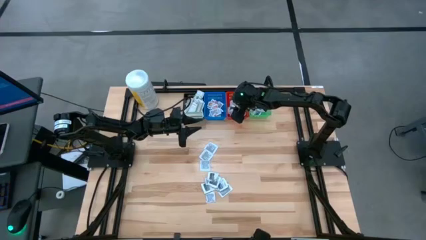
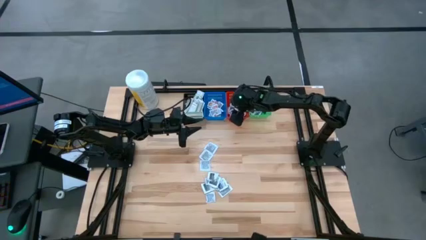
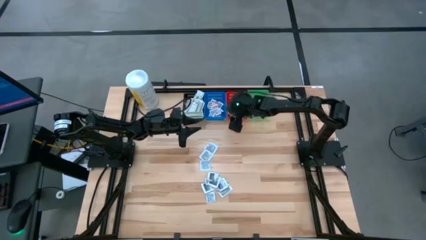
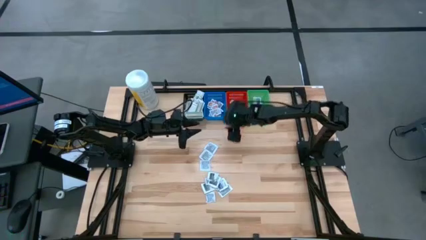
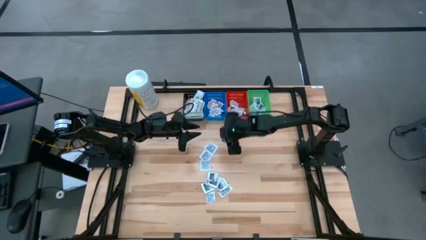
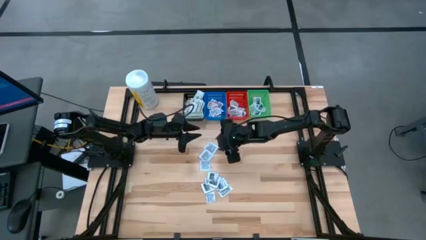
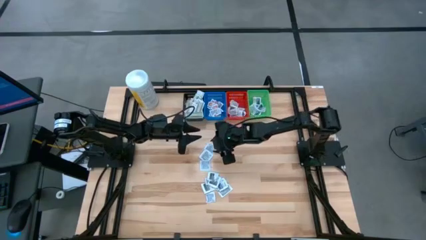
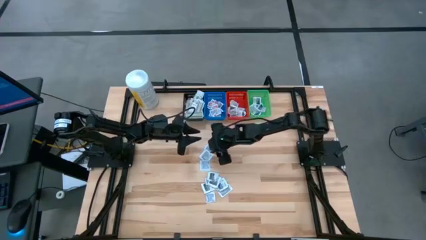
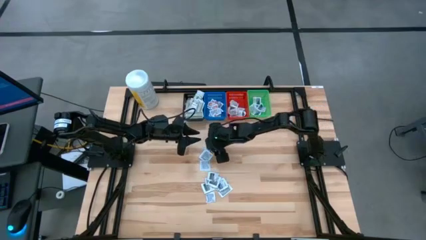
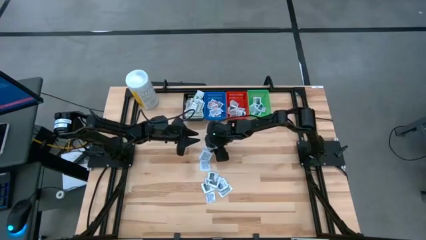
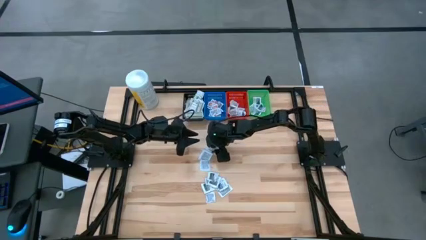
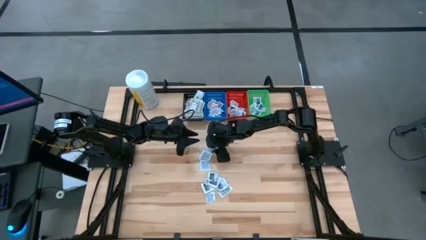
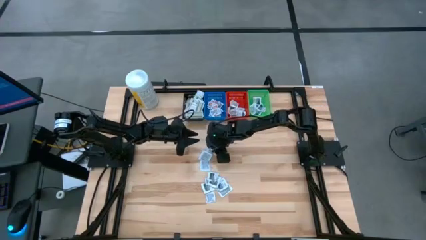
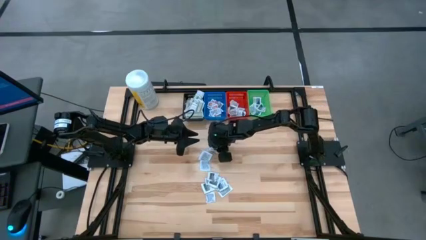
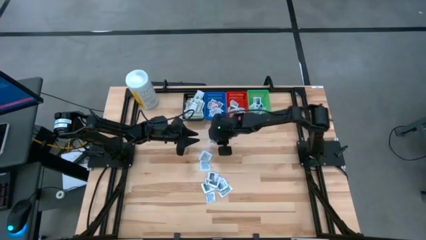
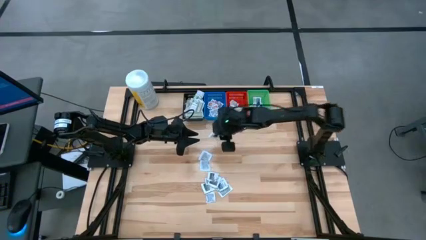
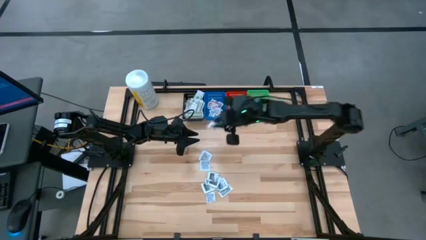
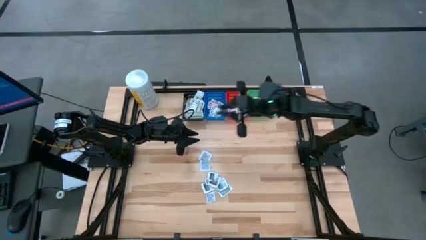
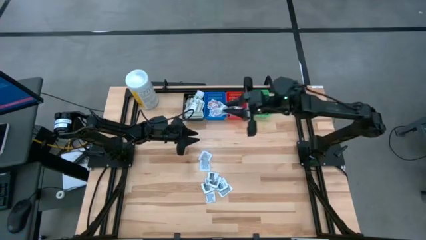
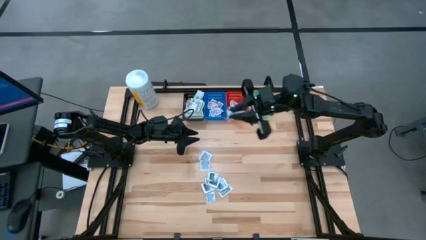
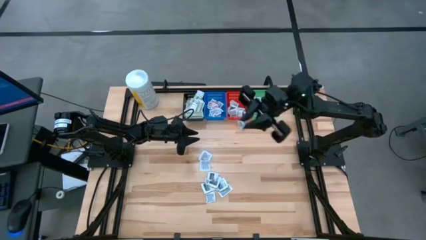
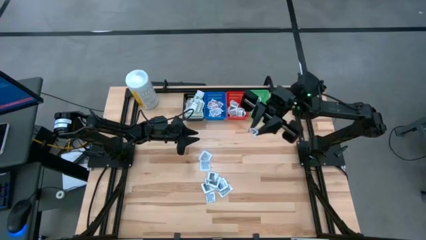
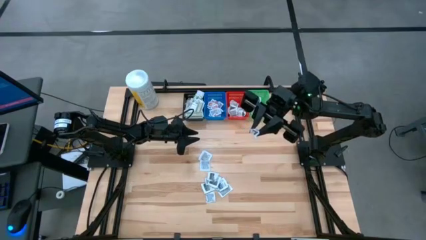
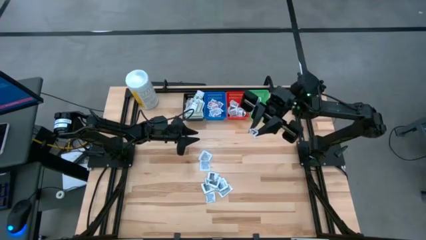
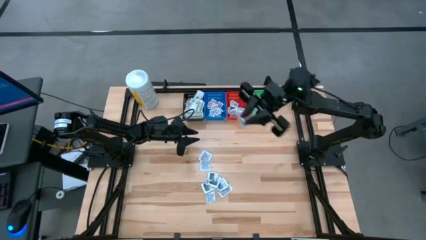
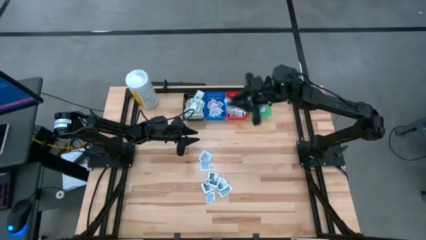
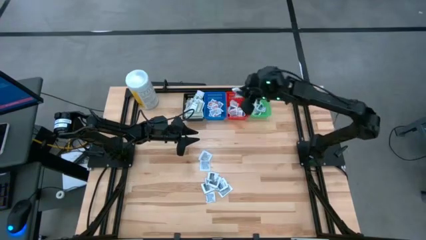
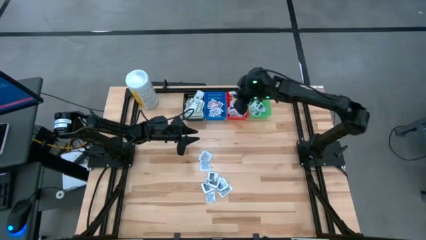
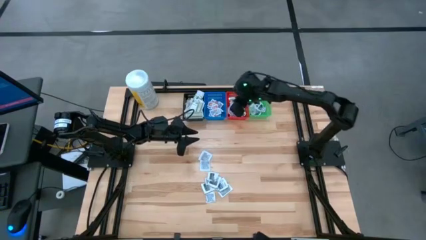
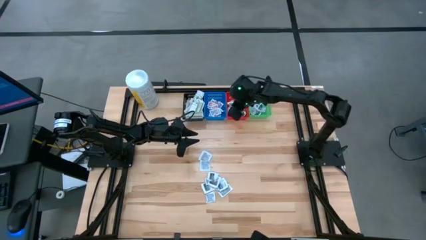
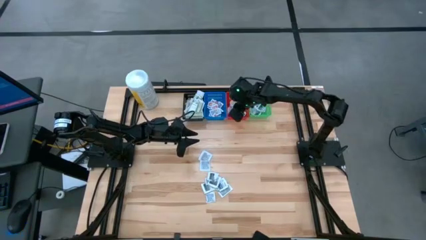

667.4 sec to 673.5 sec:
Task: Pick & Place First Aid Supplies
Put the gray towelette pack in the red bin
